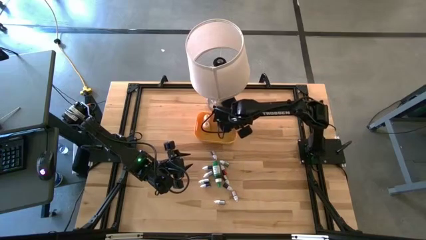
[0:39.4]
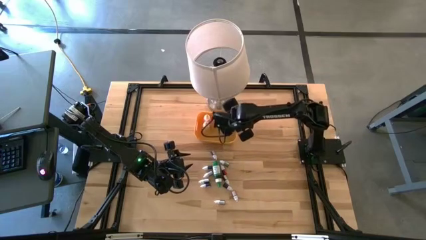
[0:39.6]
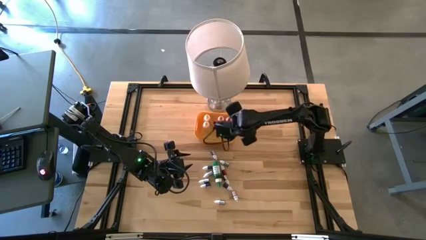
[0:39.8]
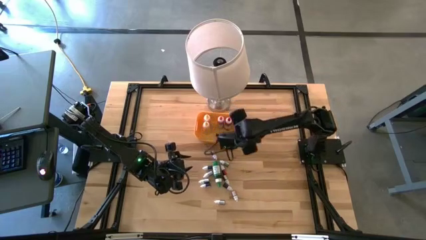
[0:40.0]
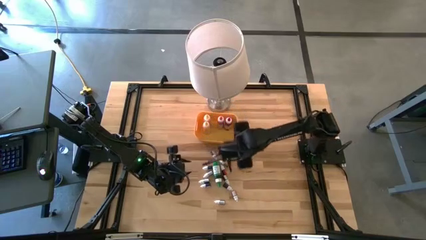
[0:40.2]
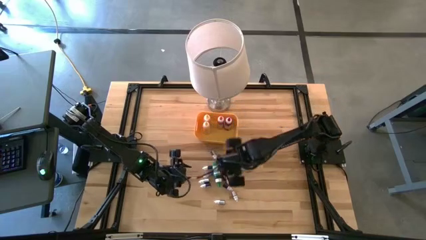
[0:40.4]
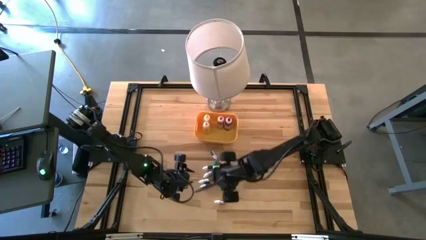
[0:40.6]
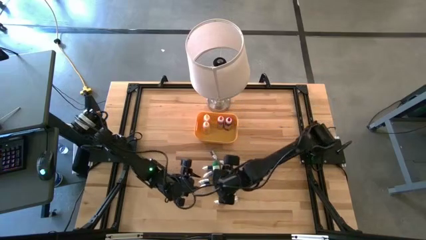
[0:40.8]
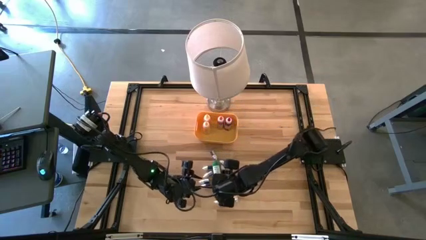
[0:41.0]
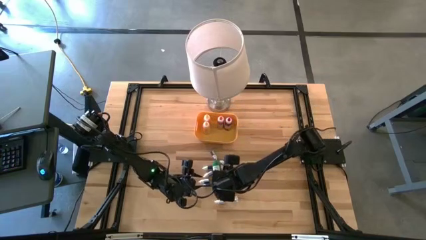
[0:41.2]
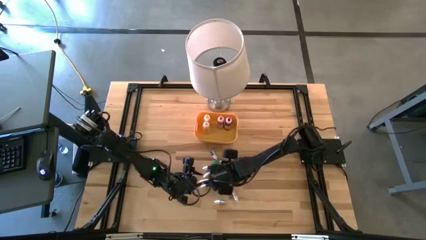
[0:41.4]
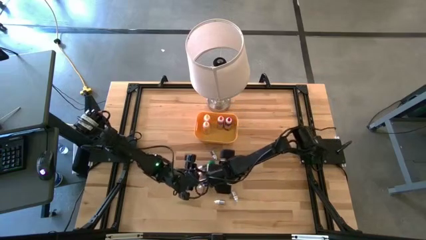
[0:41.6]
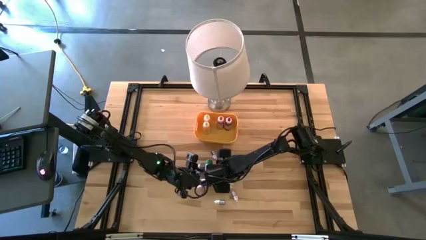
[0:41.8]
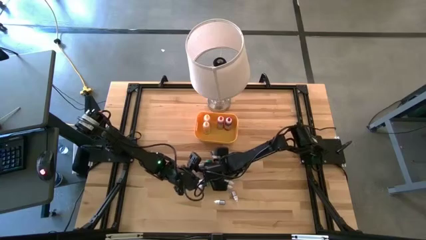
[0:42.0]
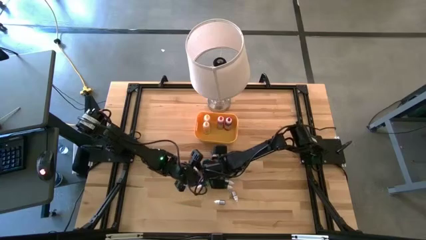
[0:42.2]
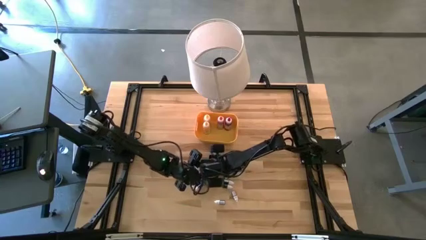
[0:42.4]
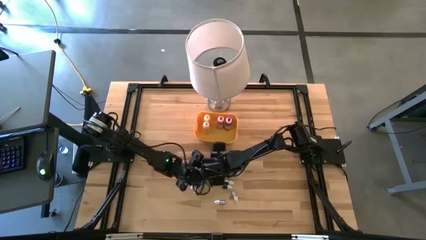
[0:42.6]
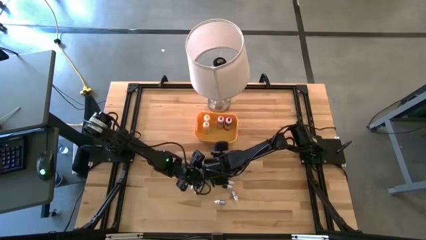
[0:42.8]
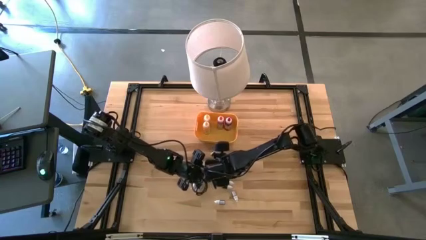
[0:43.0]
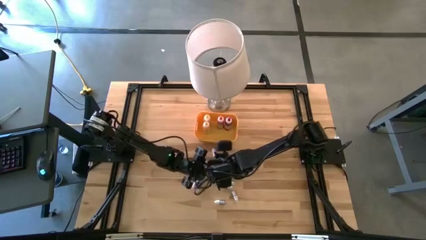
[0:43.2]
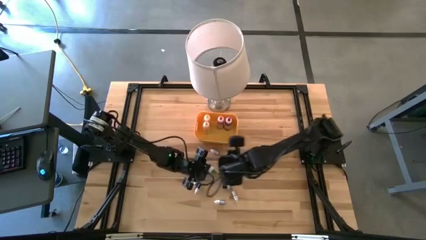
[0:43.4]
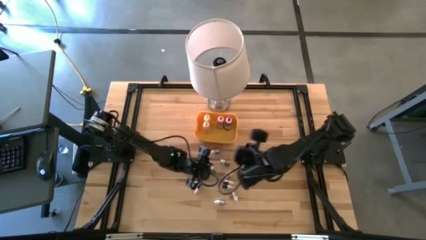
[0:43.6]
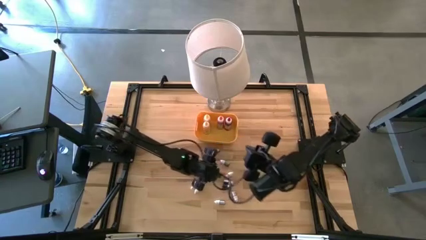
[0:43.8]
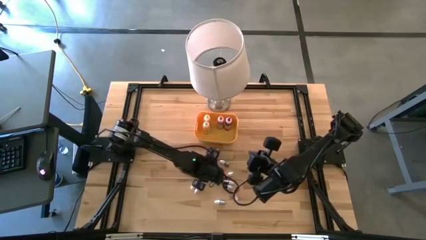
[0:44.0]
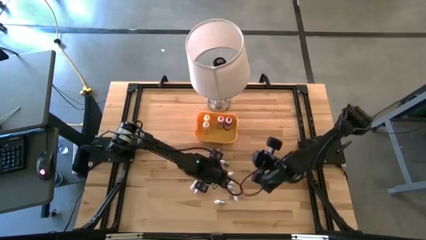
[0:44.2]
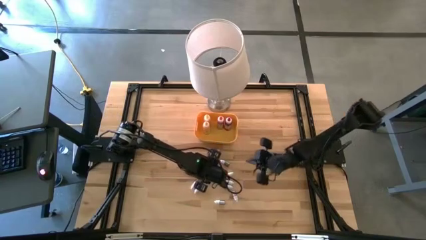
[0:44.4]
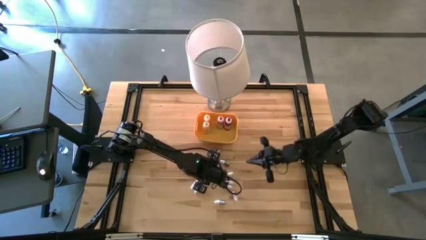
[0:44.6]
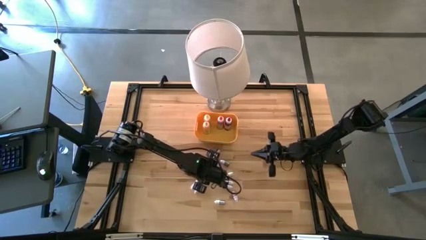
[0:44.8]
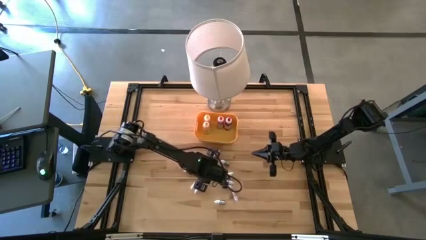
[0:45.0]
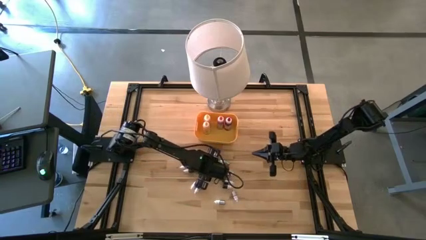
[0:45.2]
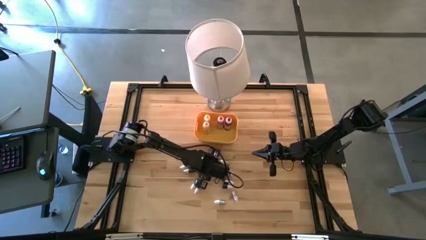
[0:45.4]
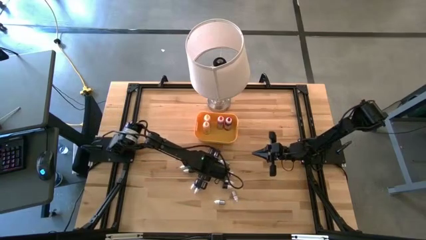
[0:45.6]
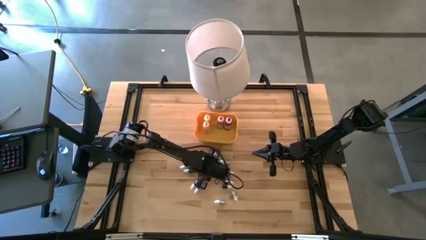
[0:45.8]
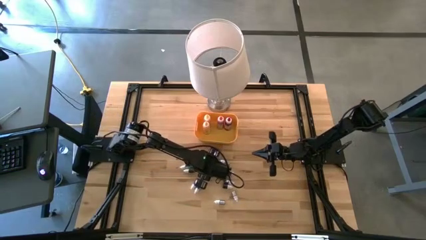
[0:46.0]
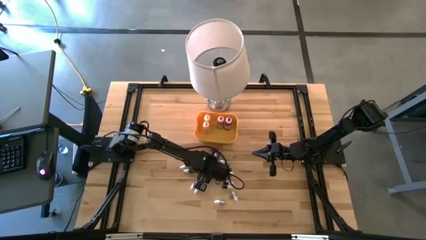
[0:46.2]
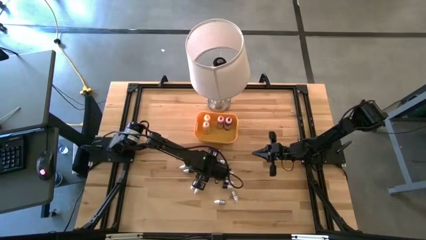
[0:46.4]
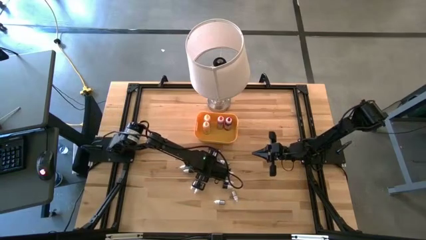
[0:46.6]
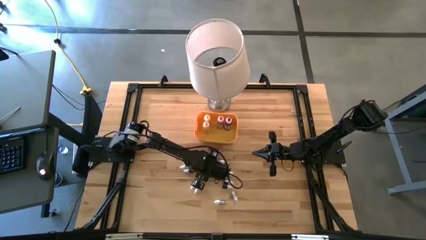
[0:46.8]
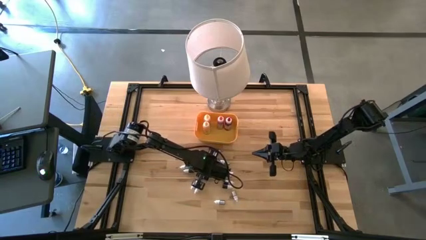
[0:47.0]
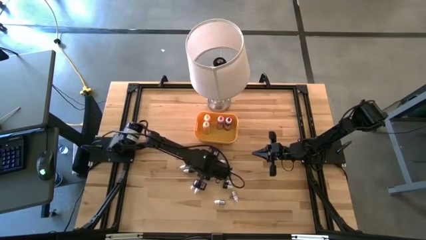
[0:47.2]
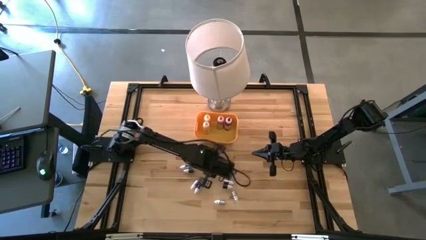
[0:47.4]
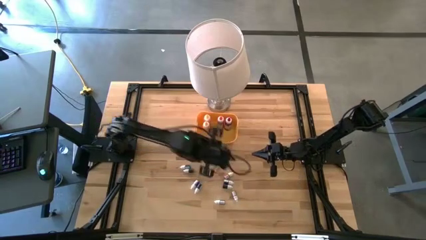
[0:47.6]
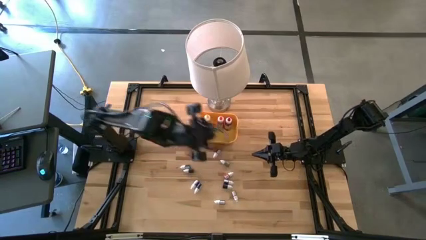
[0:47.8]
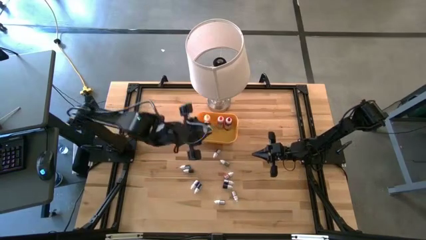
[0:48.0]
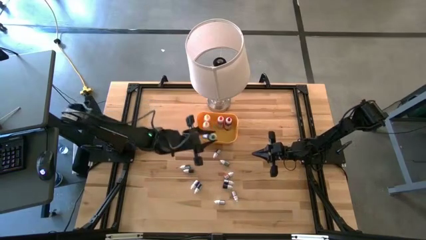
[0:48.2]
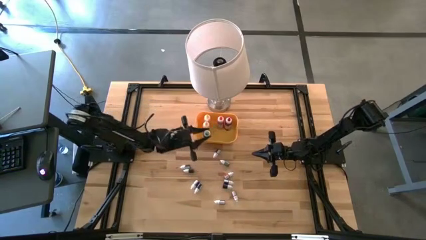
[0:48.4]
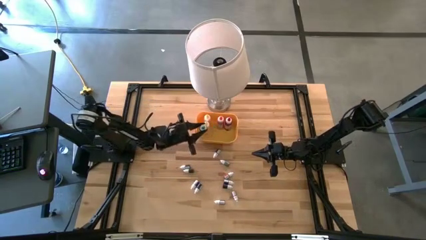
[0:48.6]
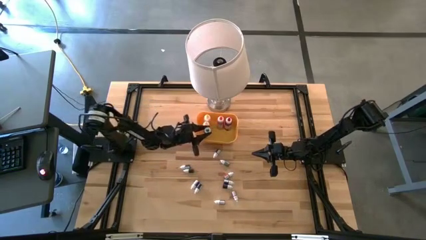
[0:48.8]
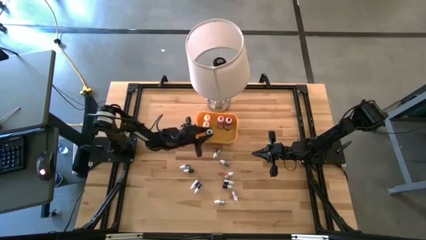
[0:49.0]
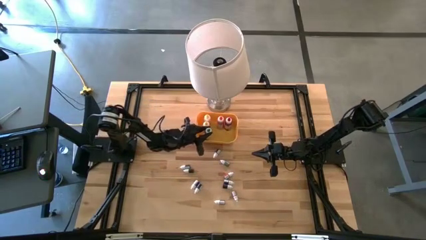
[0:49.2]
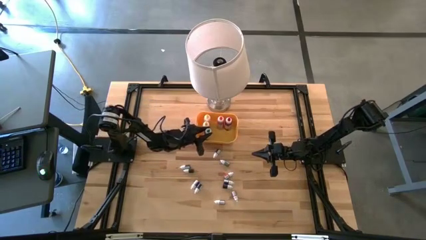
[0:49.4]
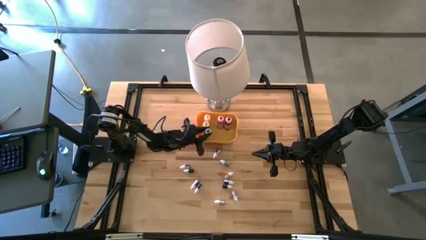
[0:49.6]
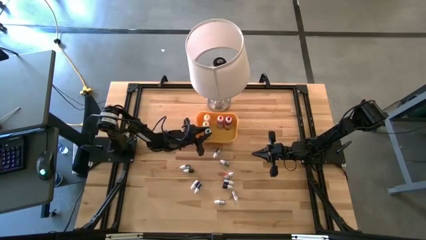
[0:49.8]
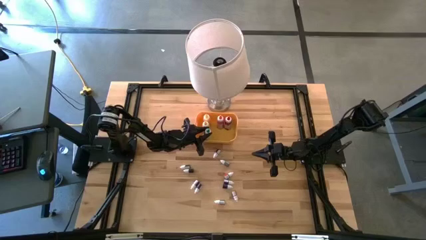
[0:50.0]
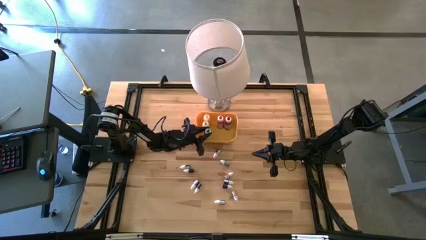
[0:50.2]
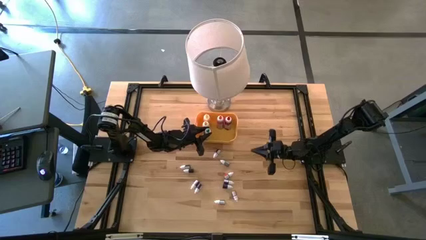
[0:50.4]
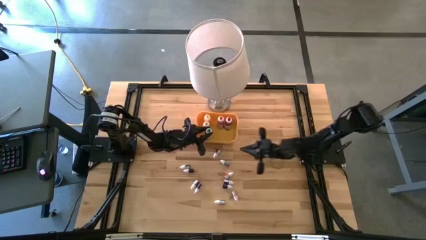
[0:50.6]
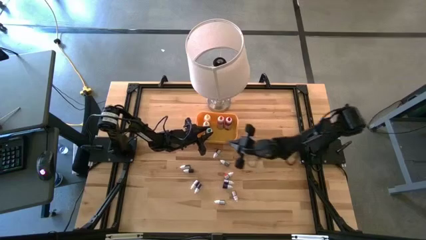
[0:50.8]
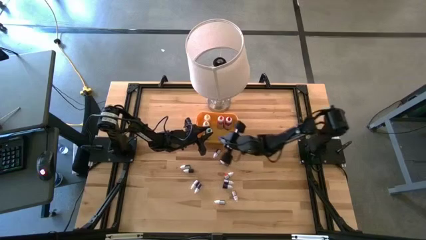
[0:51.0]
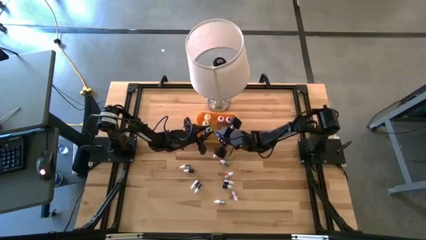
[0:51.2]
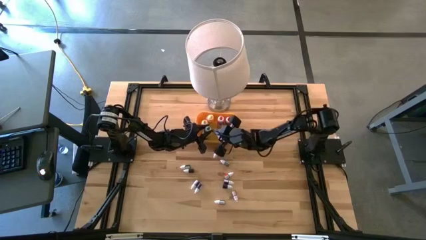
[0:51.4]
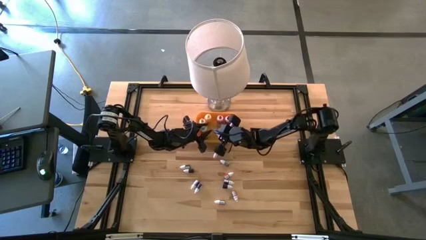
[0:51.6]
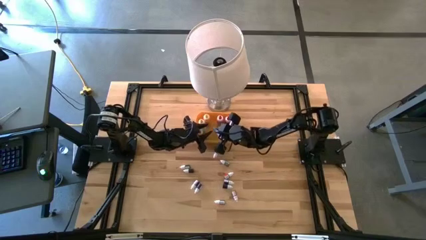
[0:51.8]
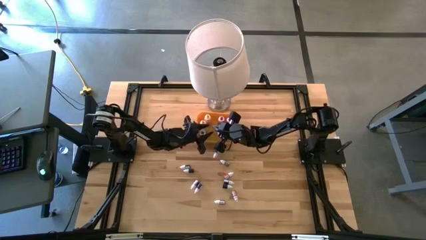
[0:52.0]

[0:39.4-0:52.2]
Task: Pick & Place food coloring
Put the green food coloring bottle into the yellow bin

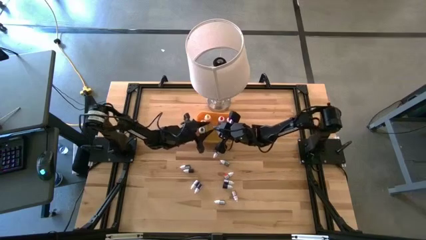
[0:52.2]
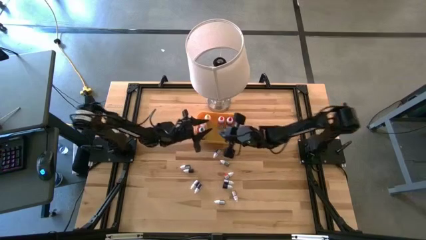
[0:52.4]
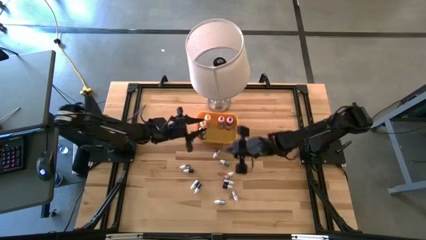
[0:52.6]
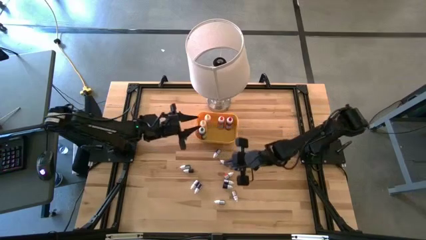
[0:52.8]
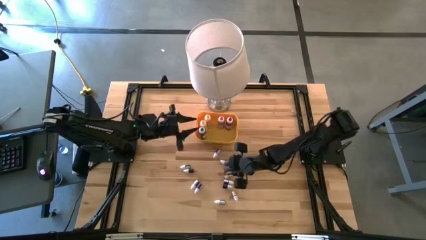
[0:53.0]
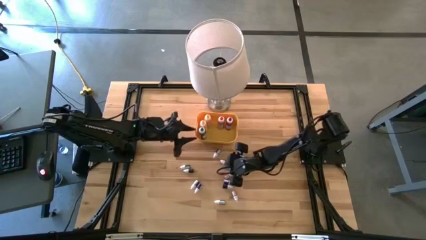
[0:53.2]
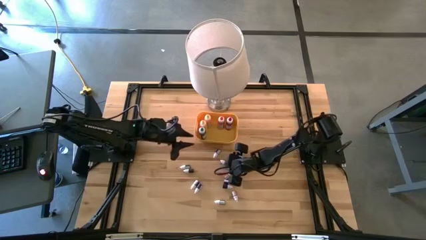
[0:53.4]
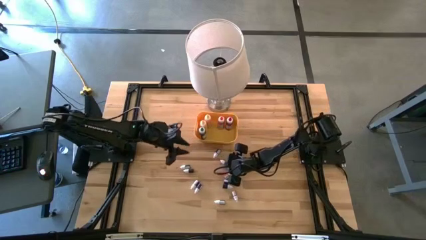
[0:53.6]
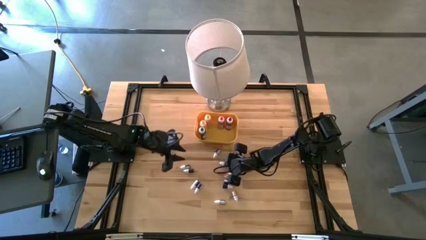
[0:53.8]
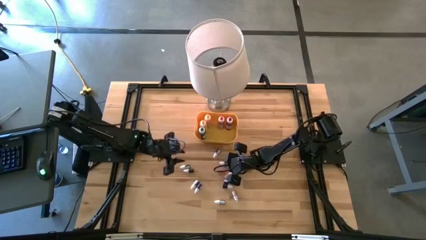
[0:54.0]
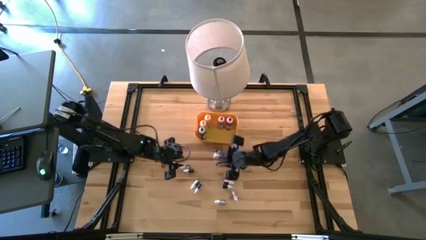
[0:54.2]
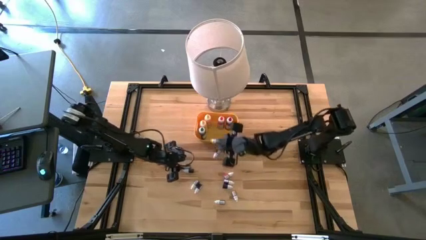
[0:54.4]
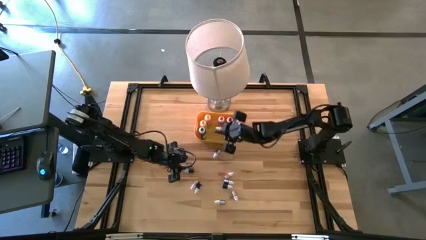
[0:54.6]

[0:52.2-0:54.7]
Put the green food coloring bottle into the yellow bin

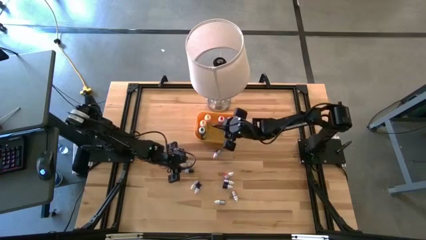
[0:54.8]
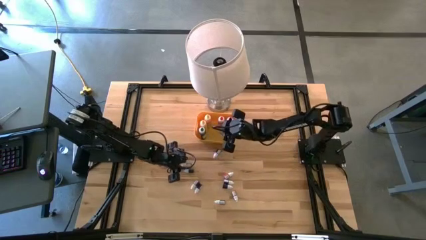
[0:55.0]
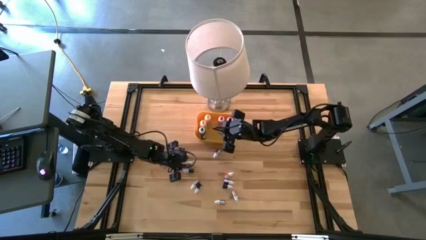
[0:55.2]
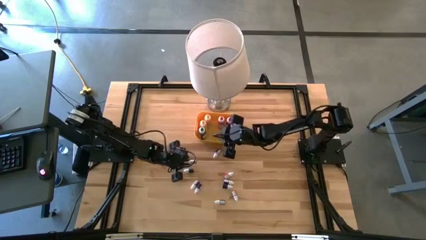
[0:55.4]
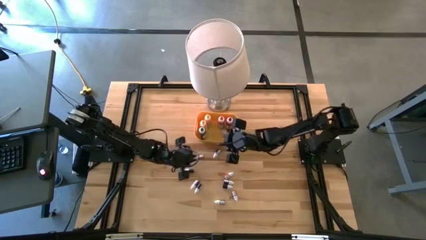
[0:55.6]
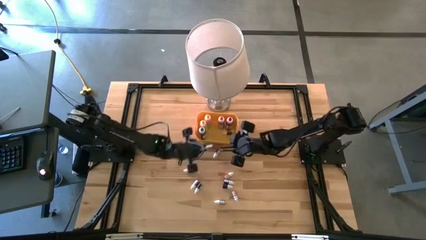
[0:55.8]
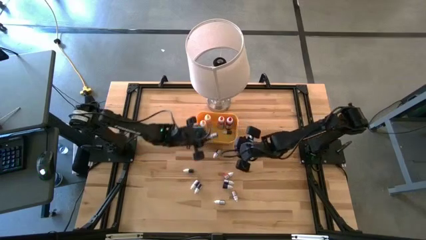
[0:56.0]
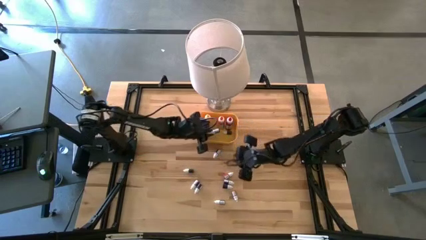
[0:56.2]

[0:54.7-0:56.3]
Put the blue food coloring bottle into the yellow bin
